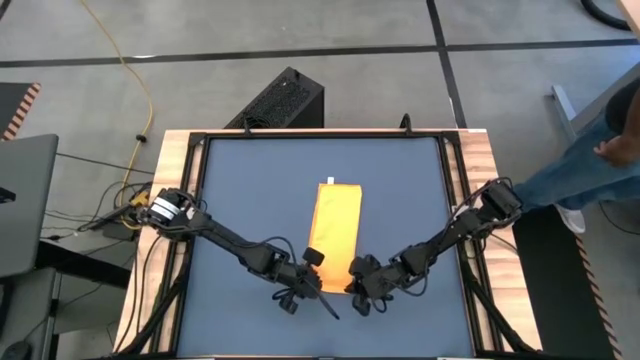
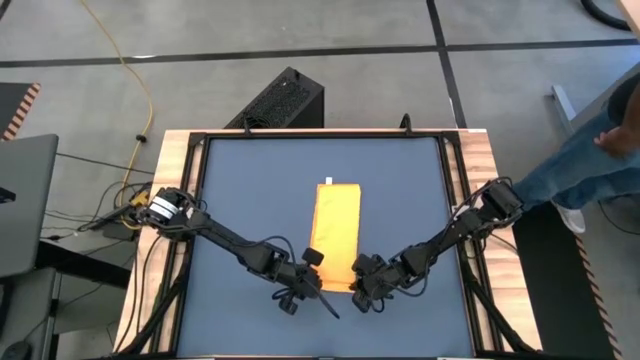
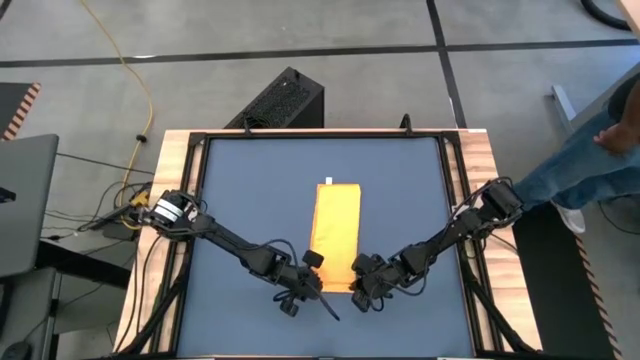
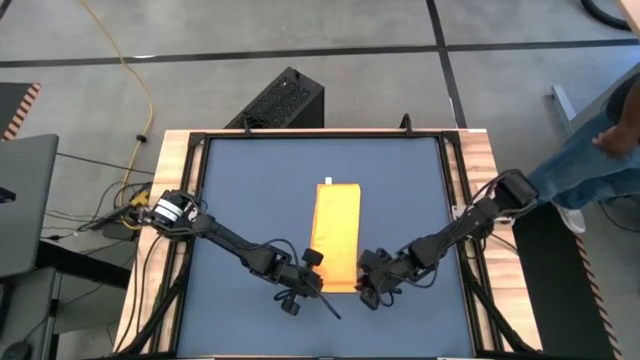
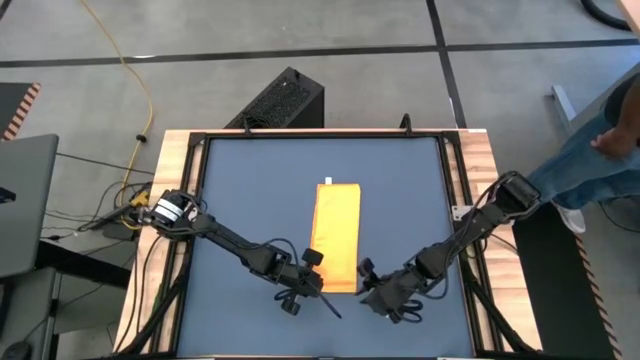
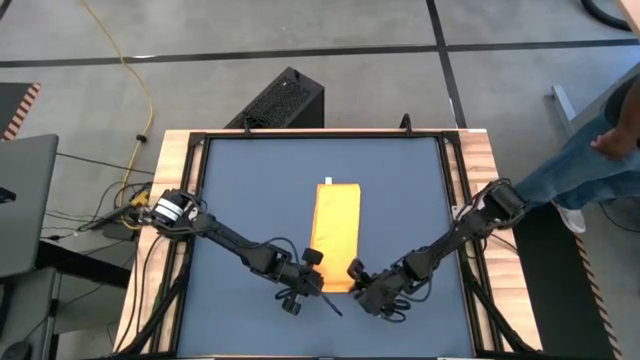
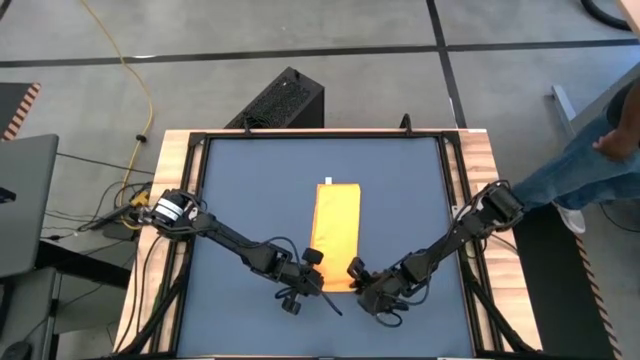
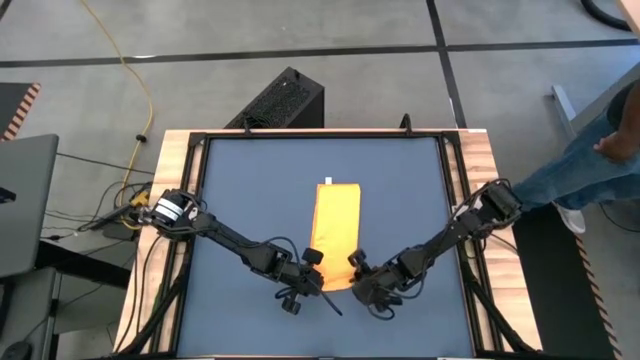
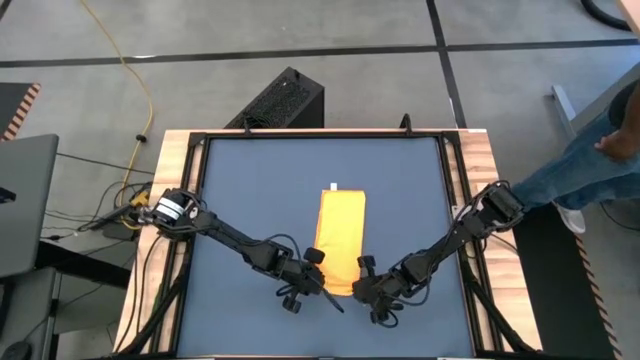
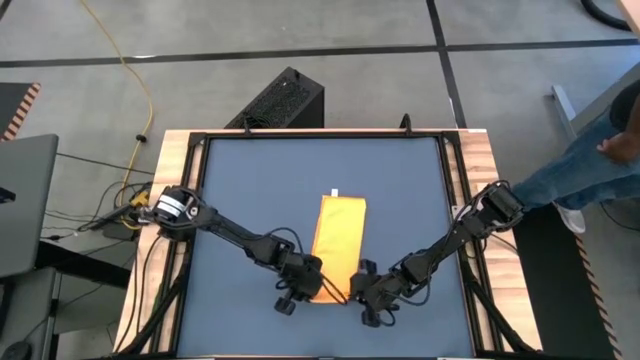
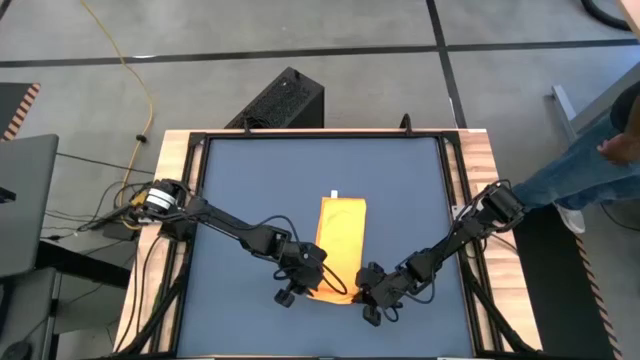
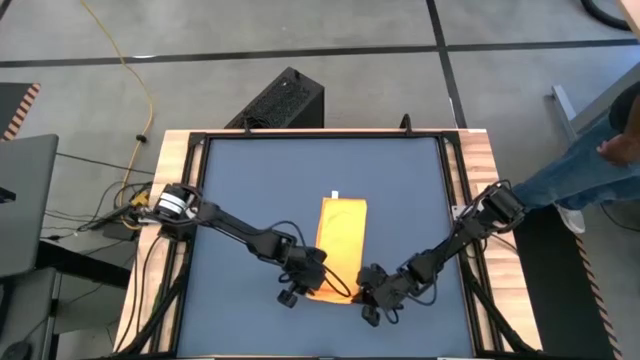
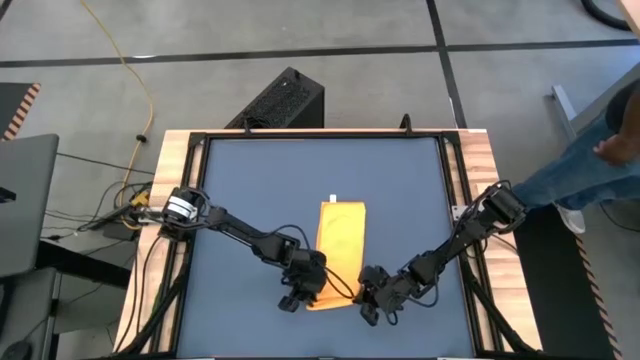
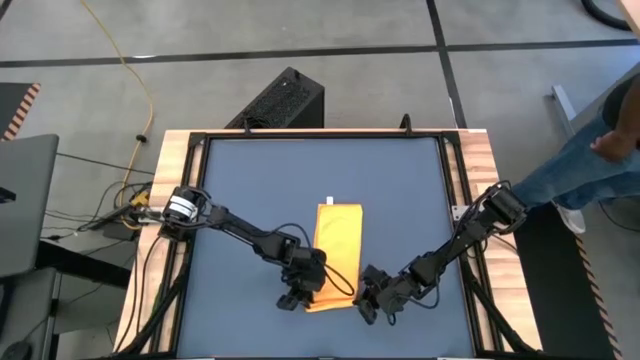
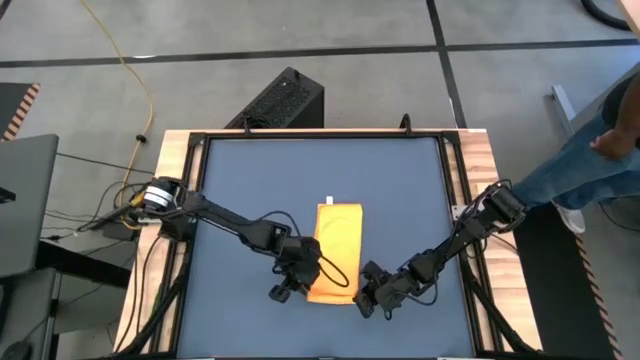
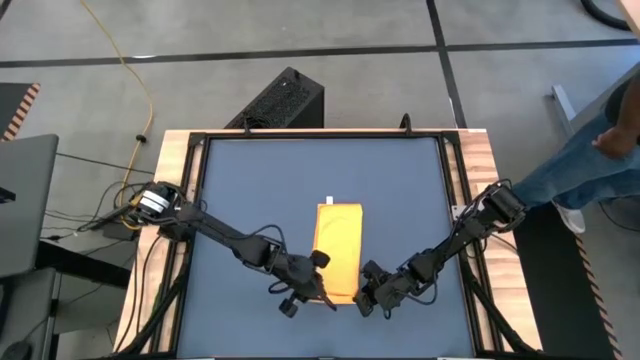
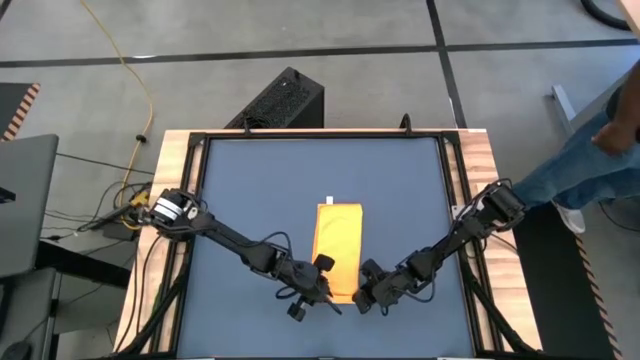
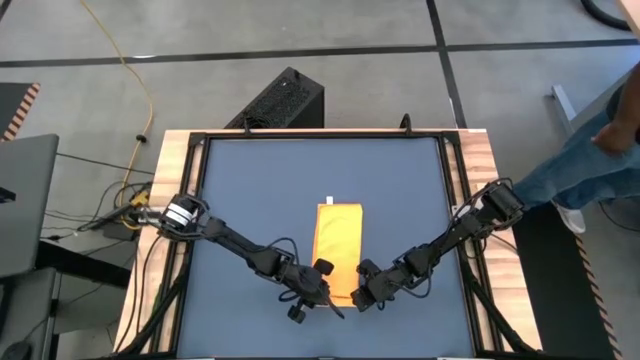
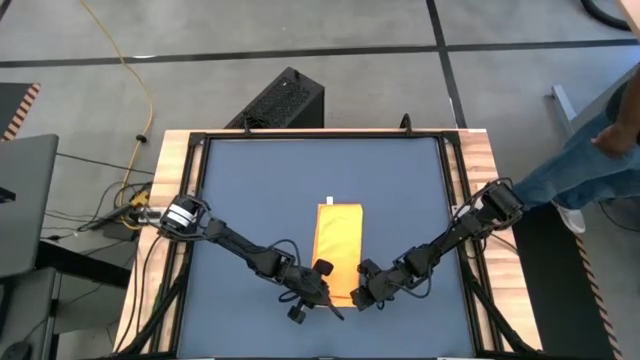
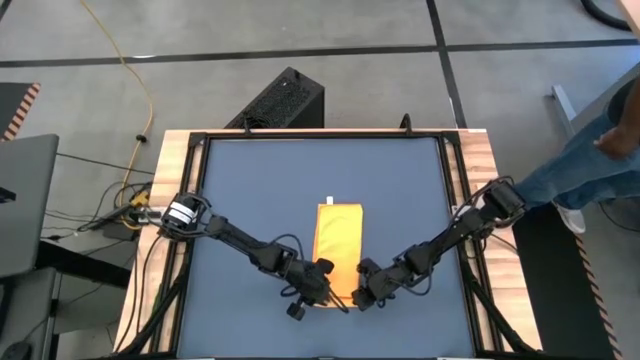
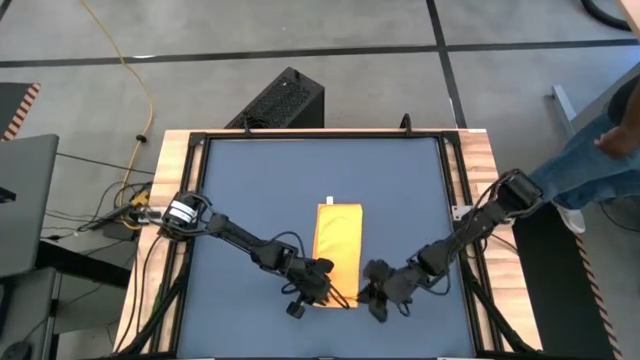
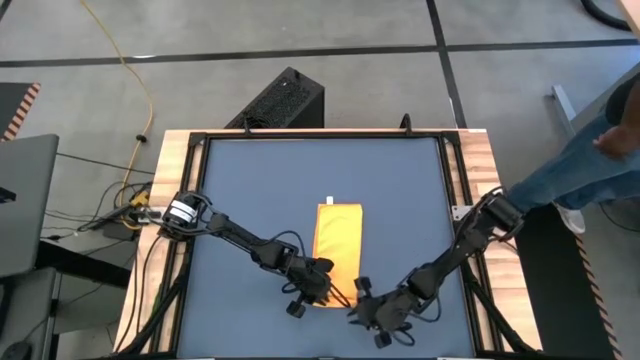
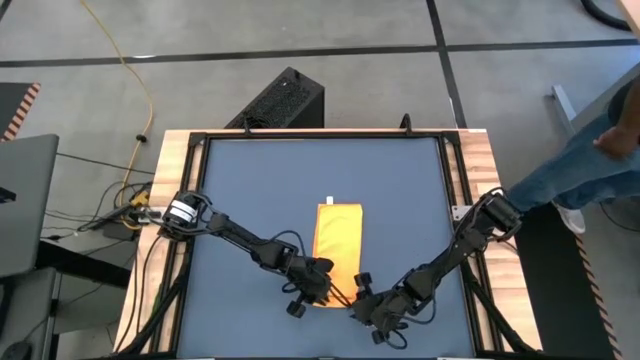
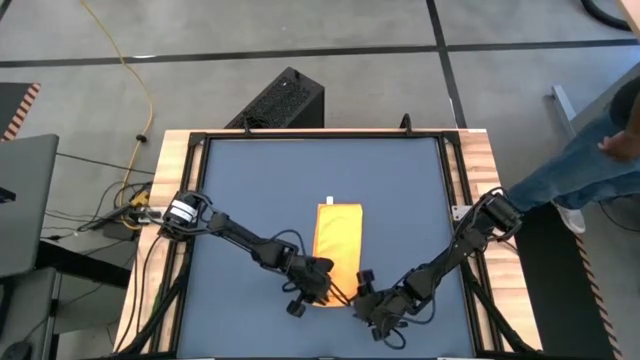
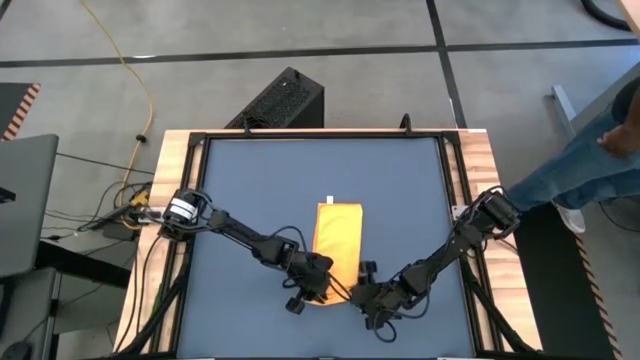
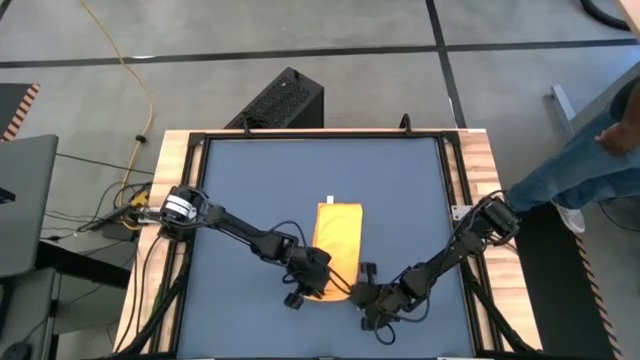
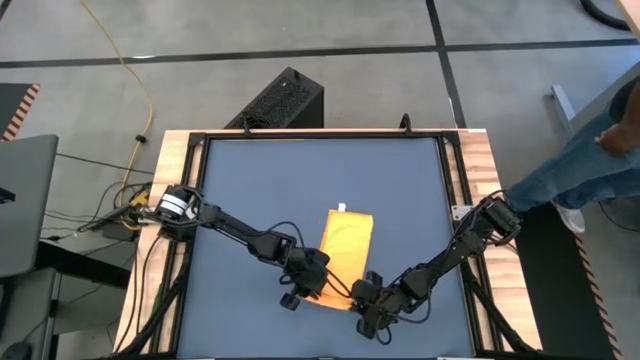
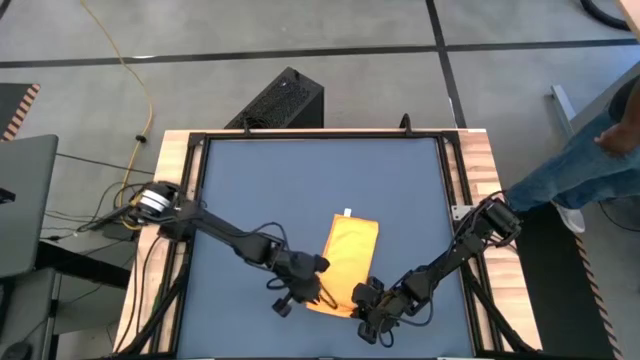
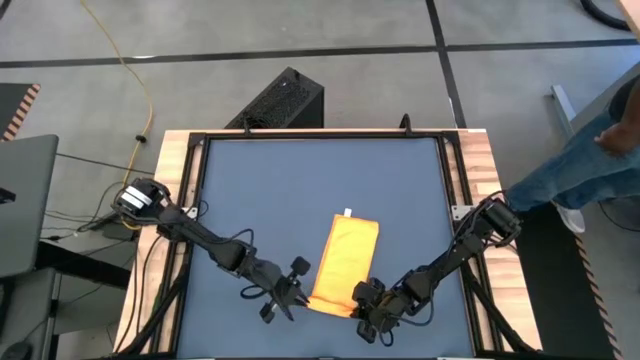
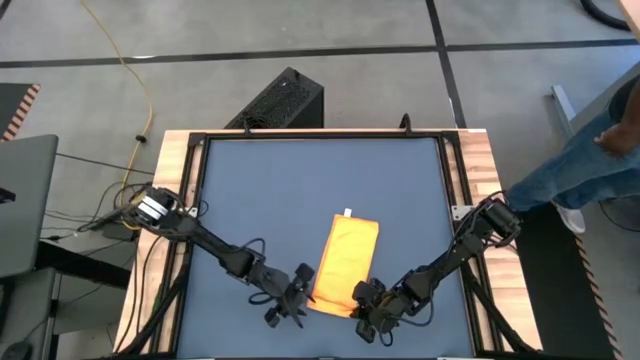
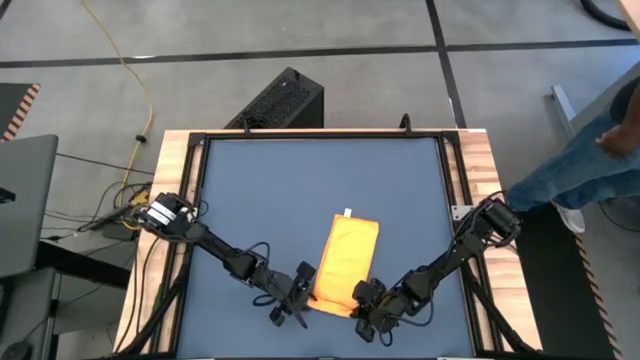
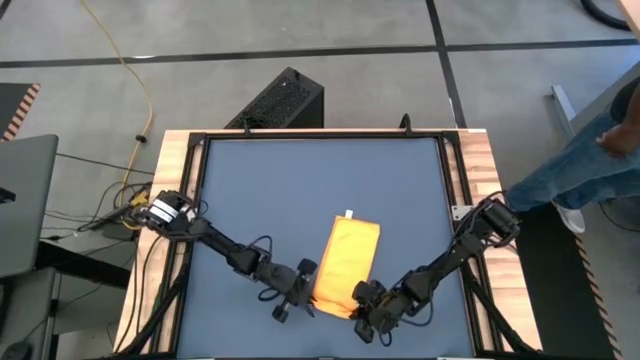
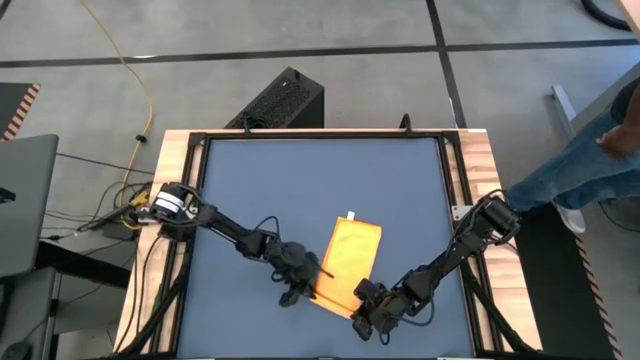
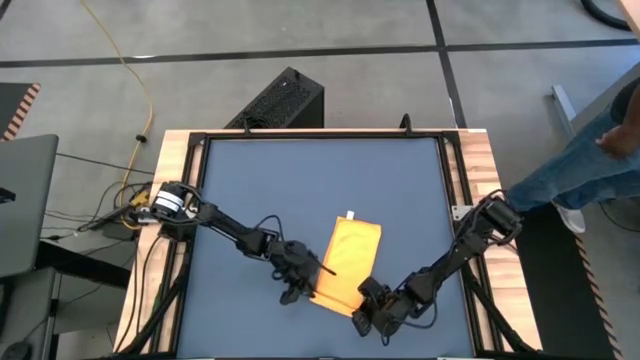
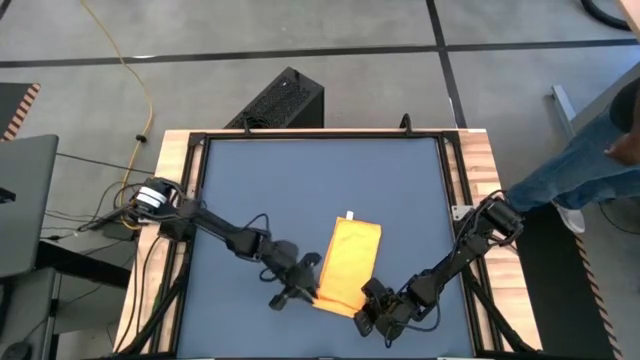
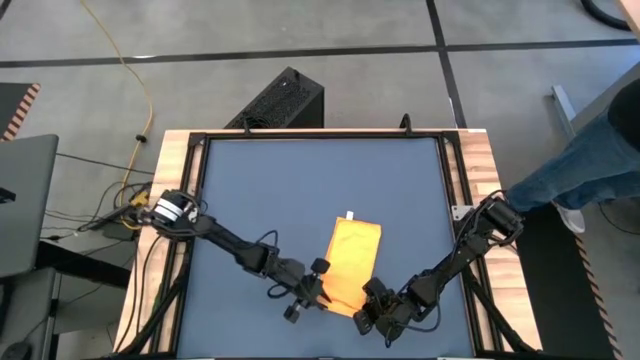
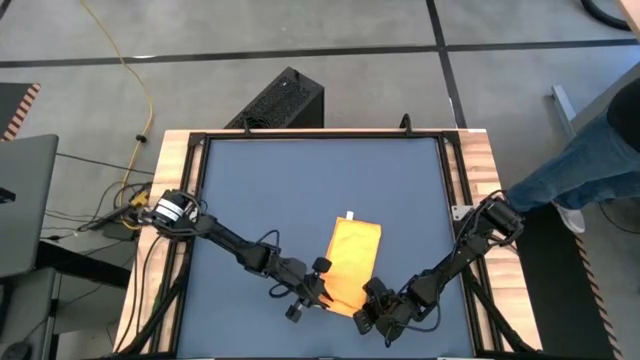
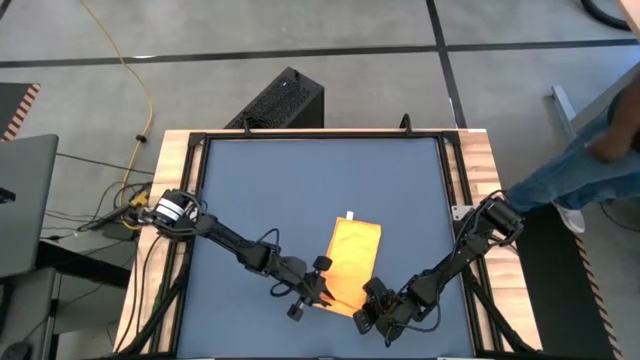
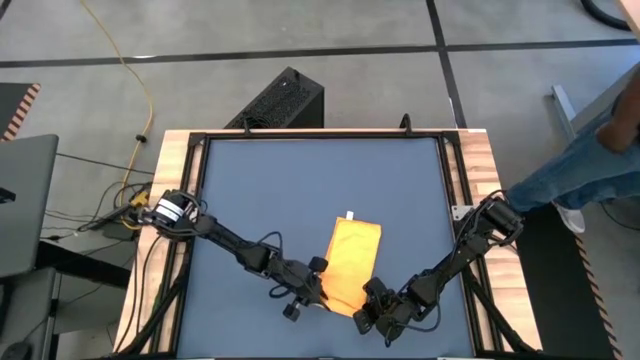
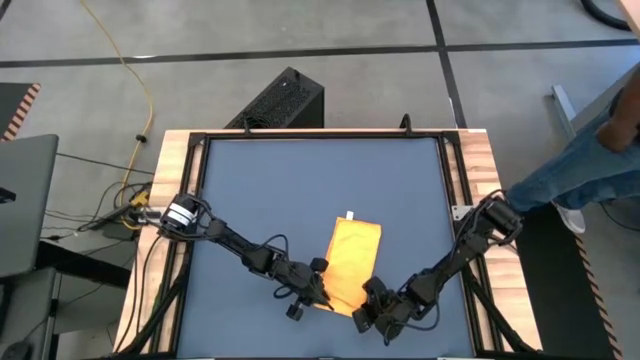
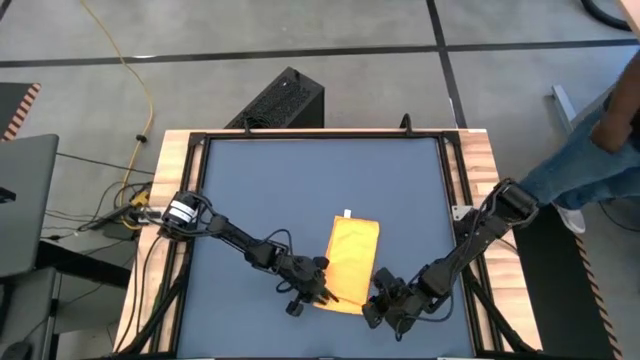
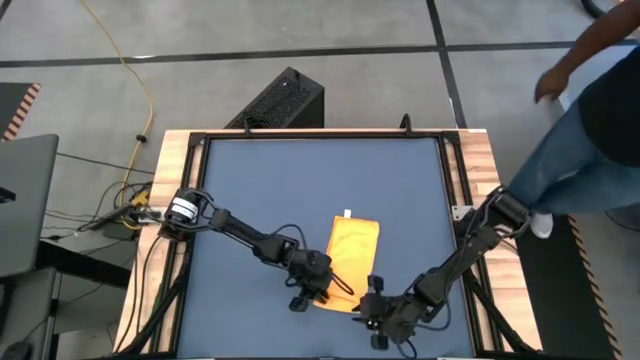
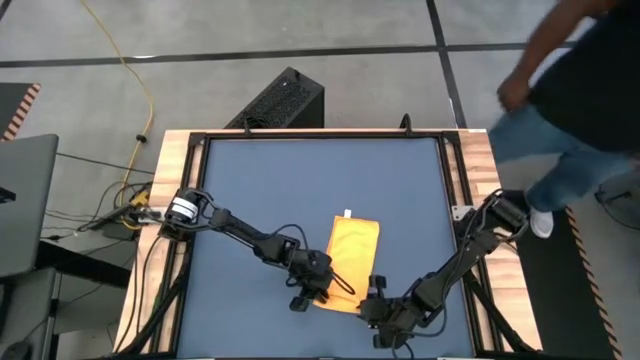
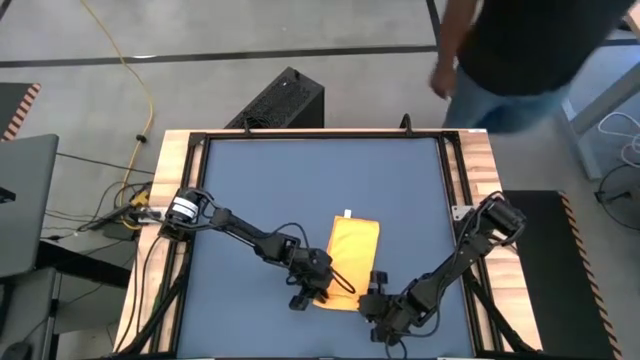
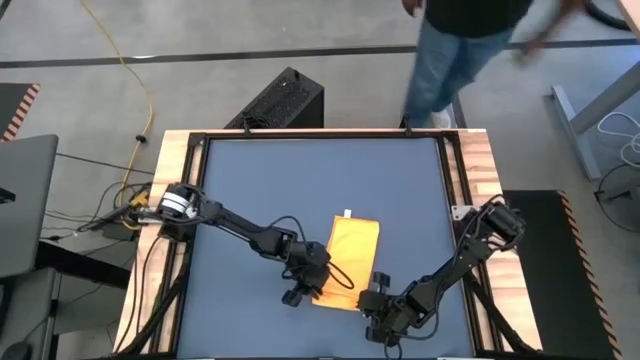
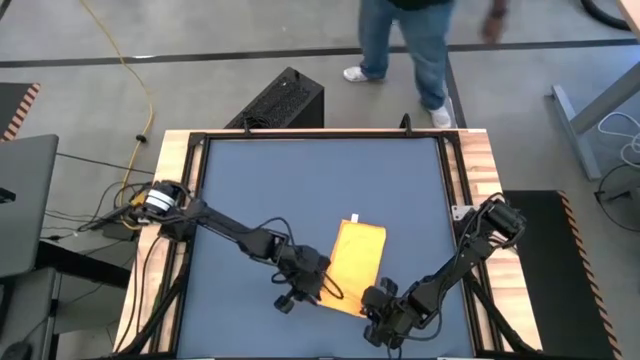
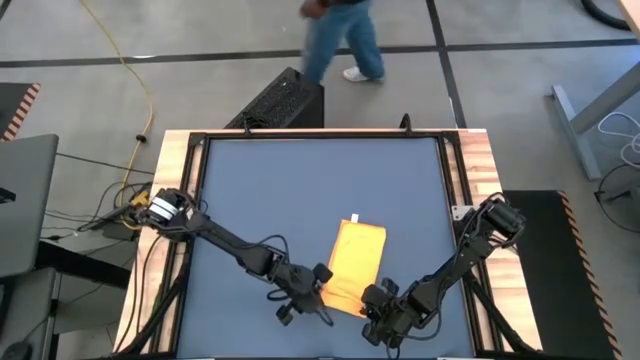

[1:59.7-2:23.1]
Task: Roll towel into tight, uniform cylinder
Roll the orange towel
